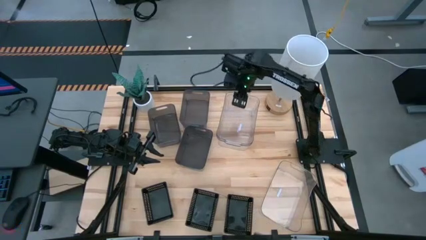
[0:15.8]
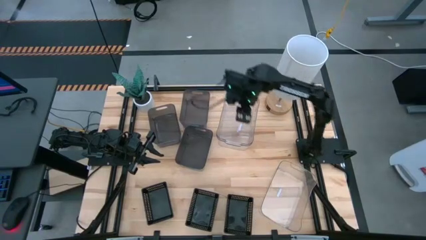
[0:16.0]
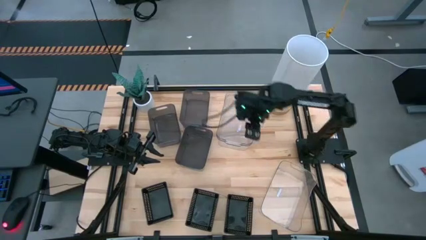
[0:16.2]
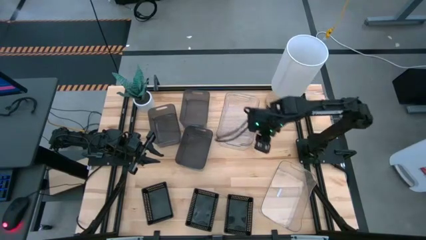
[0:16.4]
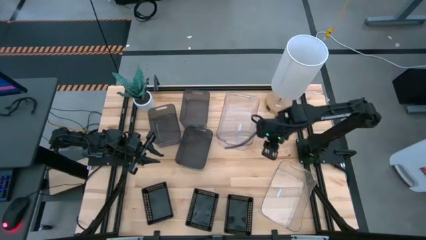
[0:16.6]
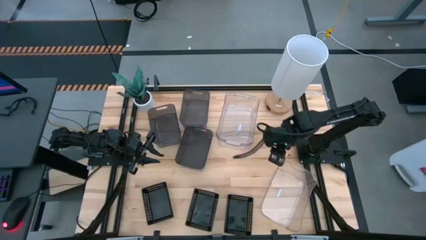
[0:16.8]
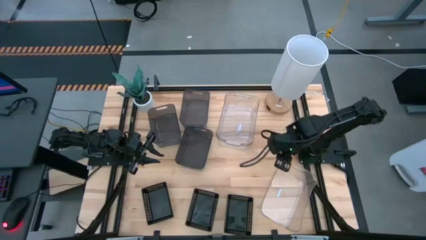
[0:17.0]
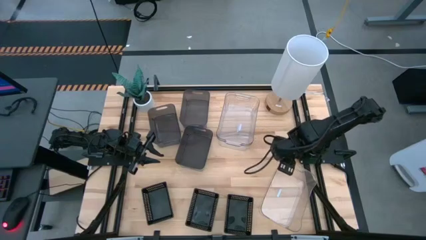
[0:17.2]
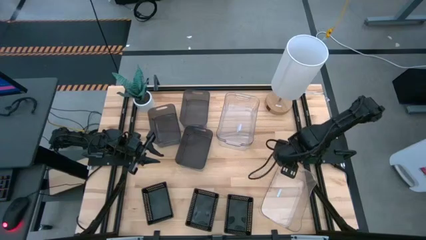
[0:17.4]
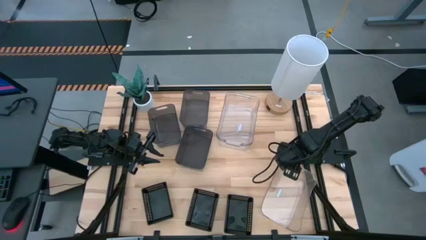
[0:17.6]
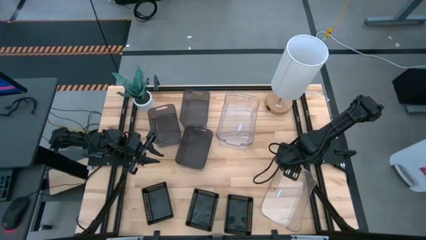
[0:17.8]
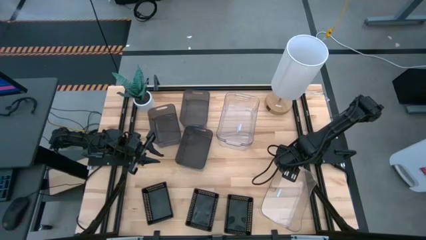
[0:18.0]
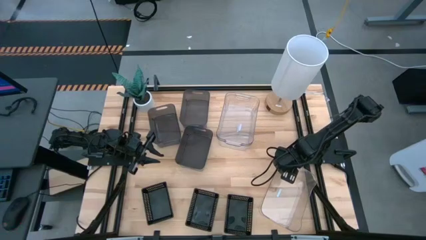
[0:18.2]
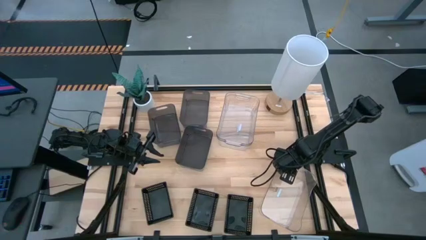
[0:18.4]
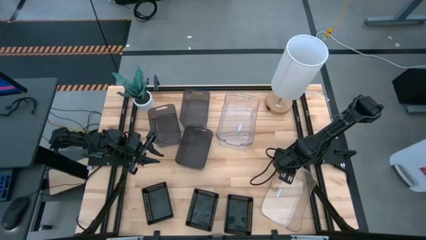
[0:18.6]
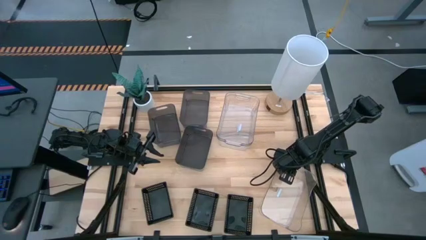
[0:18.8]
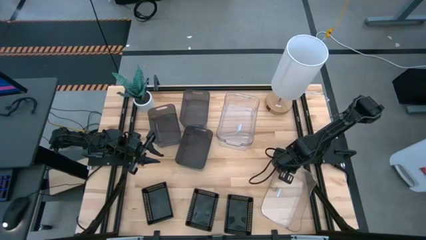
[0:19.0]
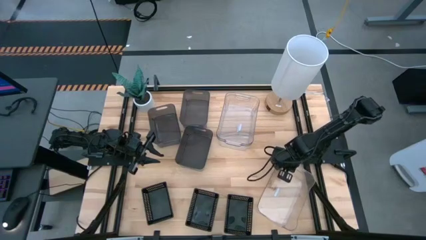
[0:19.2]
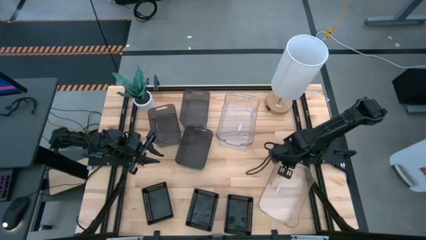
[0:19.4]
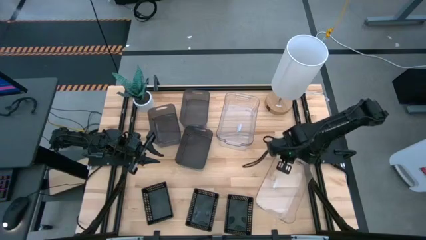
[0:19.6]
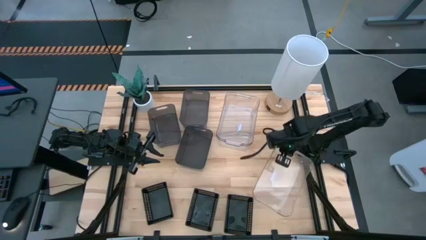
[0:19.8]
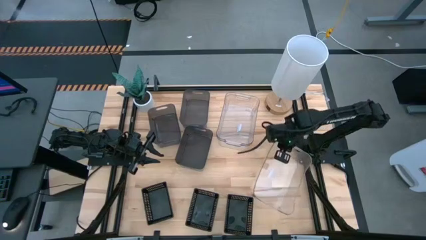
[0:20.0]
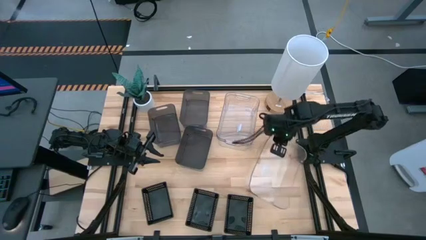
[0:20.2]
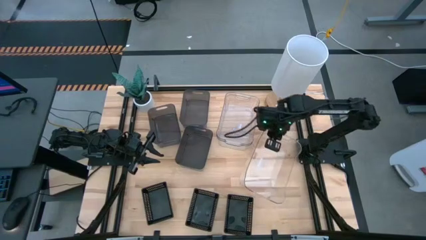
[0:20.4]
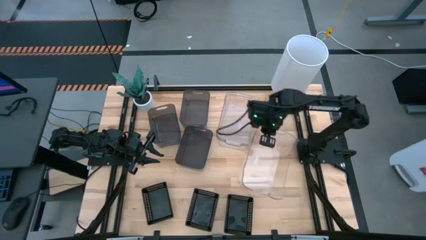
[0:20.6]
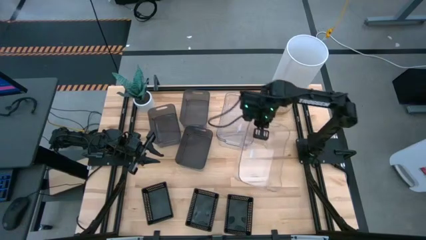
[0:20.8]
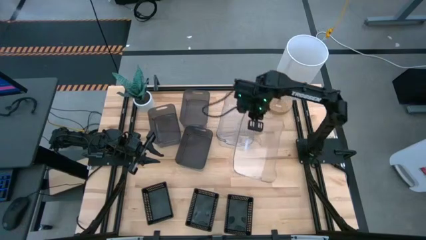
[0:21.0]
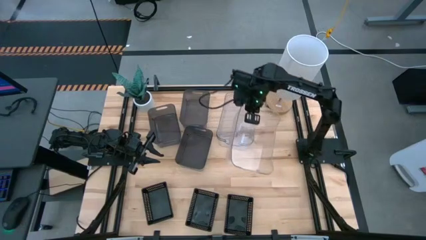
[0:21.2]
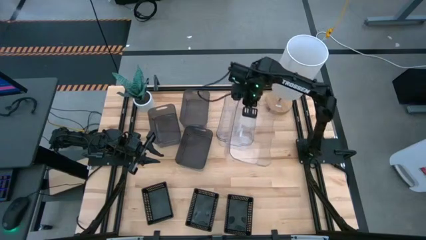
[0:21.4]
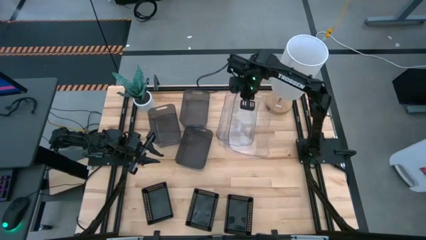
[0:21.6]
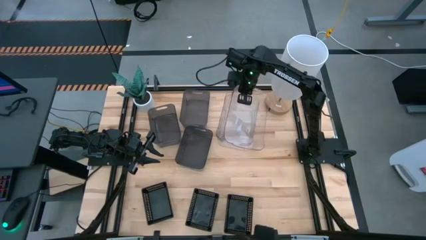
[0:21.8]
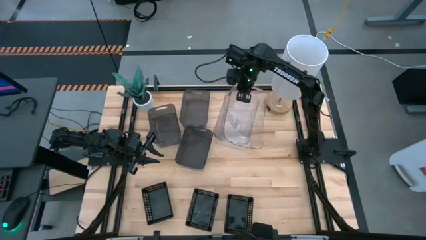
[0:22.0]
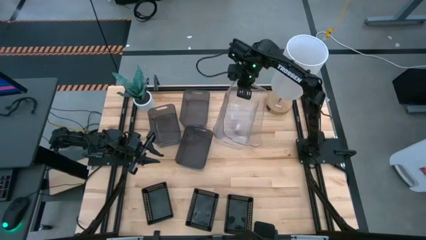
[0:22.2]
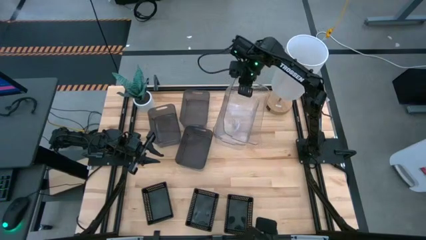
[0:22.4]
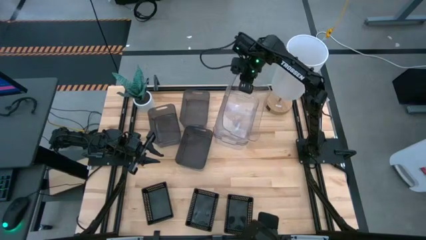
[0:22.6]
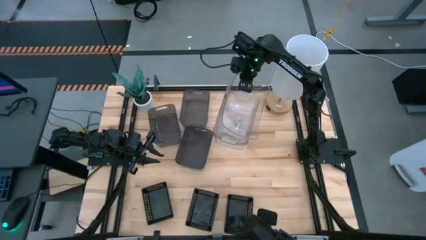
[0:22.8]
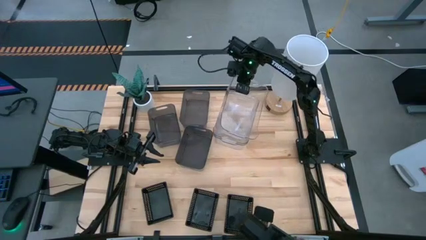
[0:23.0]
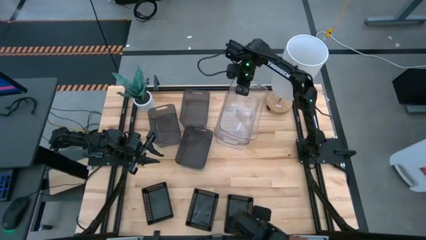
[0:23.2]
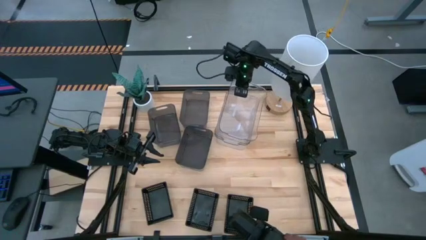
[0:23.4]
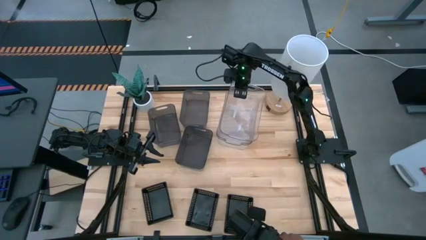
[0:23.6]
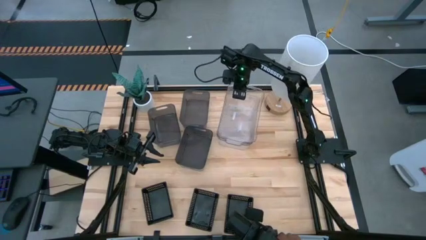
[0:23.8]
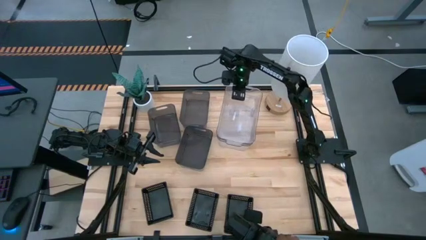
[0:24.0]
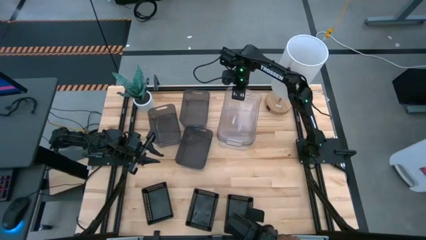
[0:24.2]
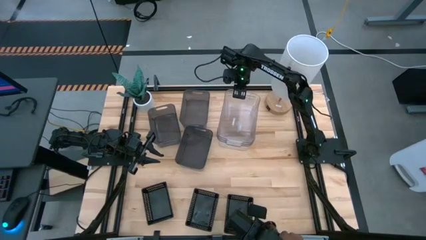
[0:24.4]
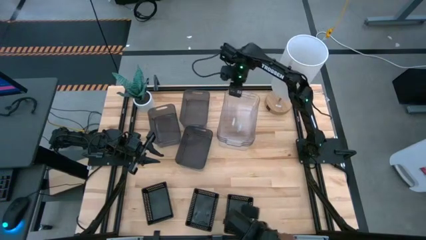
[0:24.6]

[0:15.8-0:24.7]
Stack the bottom transparent bin on the top transparent bin
